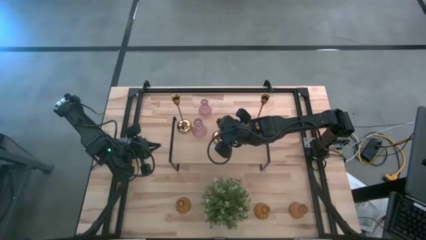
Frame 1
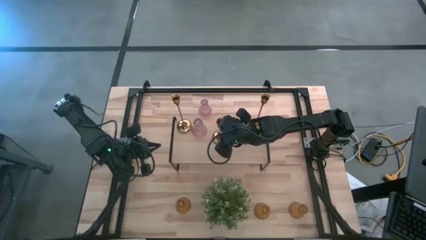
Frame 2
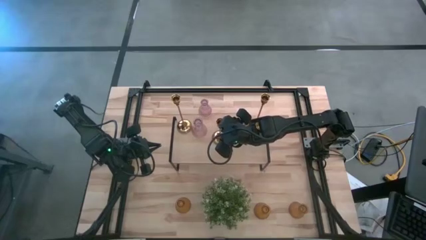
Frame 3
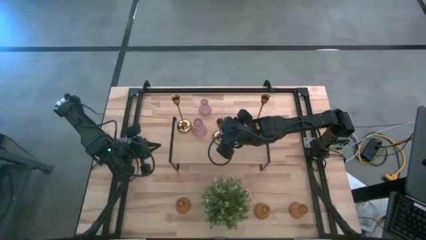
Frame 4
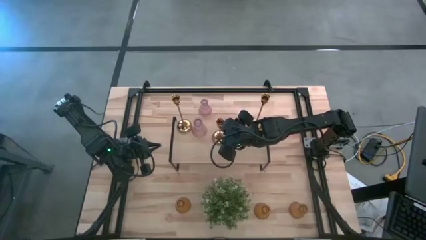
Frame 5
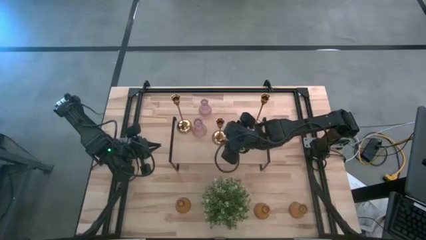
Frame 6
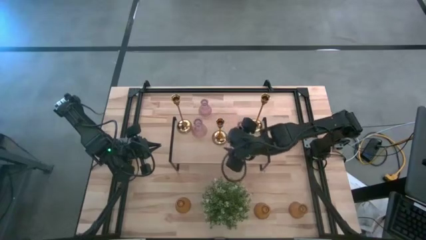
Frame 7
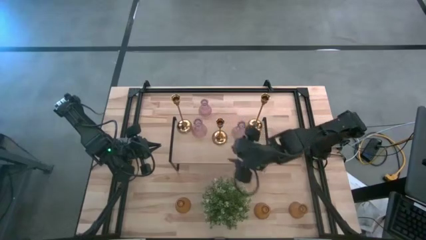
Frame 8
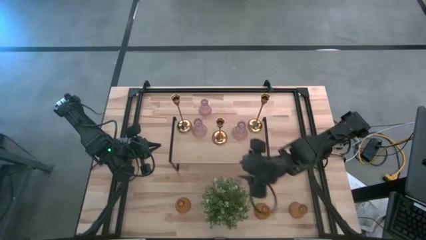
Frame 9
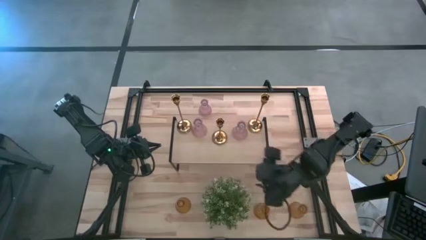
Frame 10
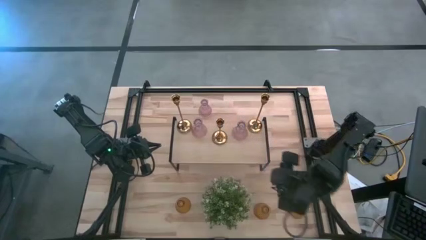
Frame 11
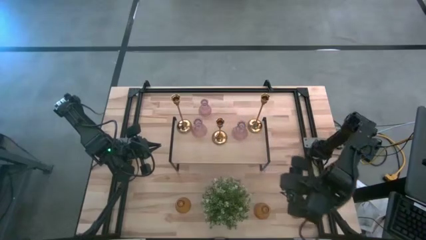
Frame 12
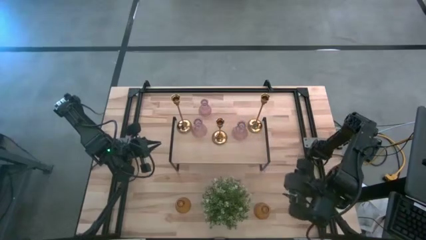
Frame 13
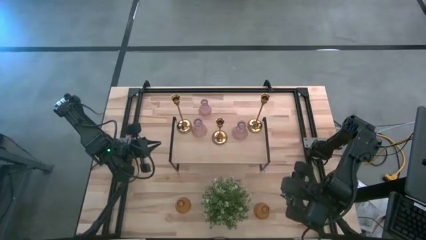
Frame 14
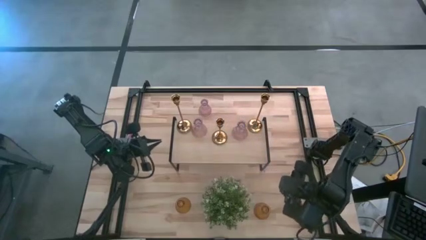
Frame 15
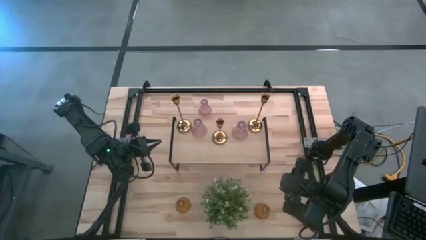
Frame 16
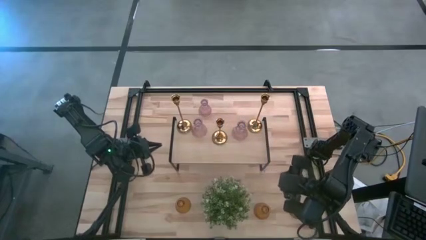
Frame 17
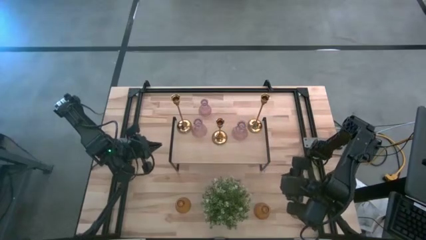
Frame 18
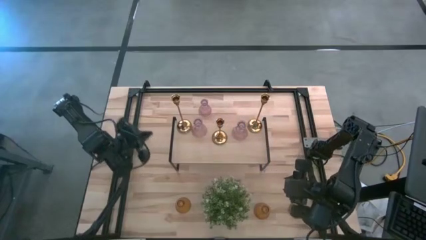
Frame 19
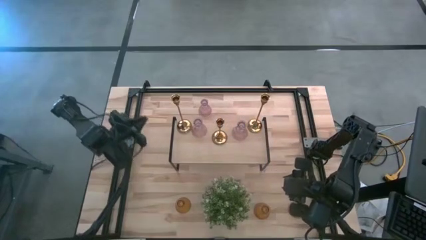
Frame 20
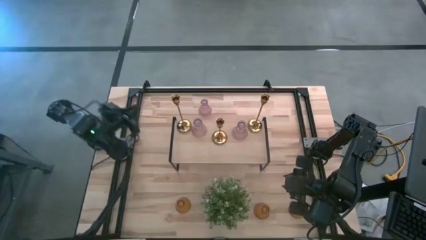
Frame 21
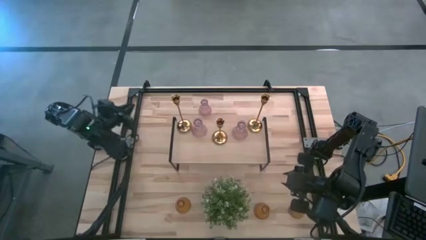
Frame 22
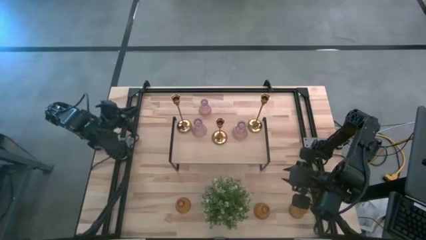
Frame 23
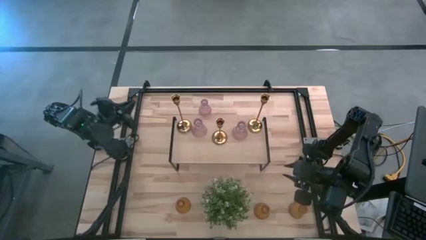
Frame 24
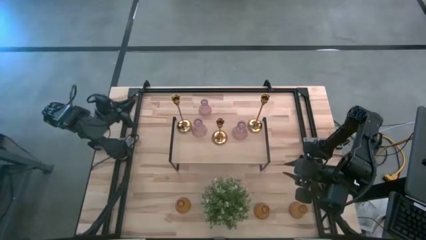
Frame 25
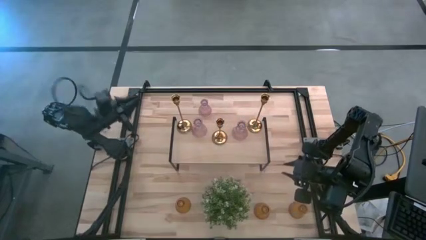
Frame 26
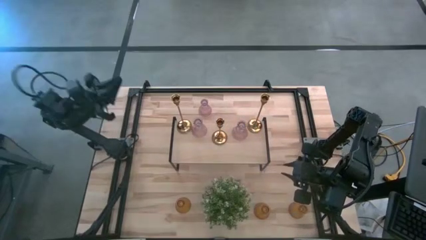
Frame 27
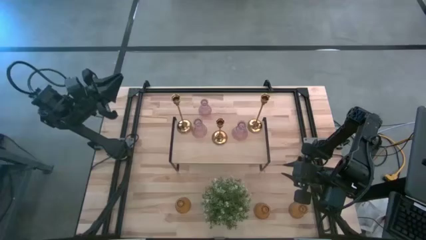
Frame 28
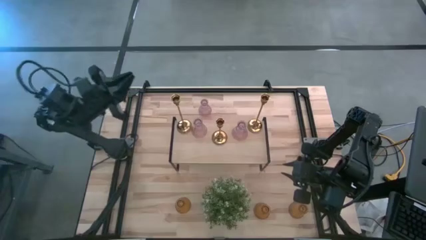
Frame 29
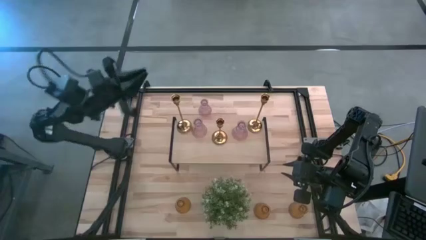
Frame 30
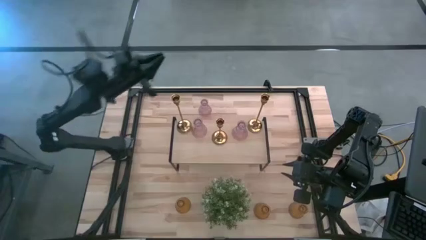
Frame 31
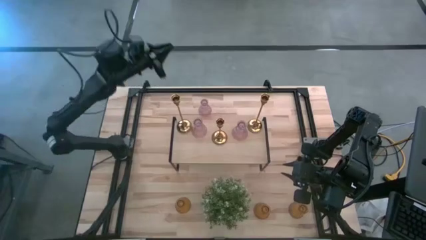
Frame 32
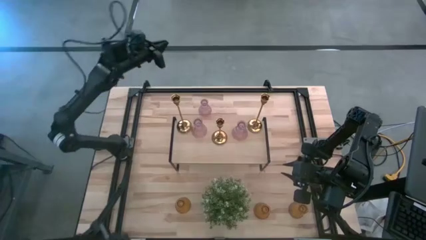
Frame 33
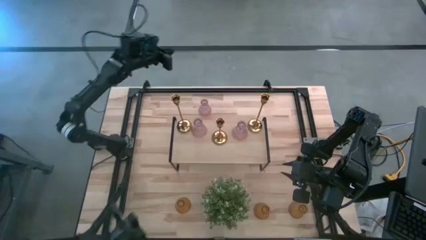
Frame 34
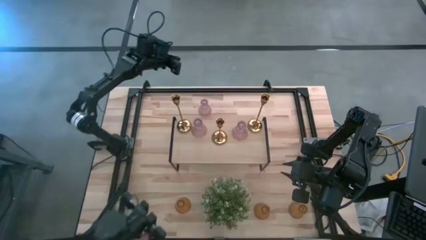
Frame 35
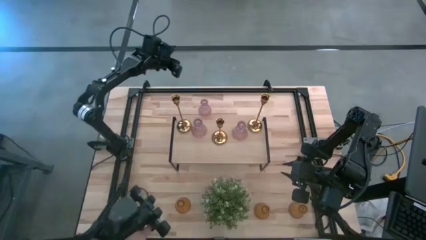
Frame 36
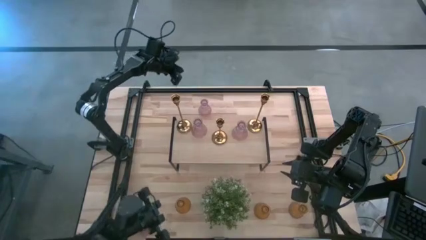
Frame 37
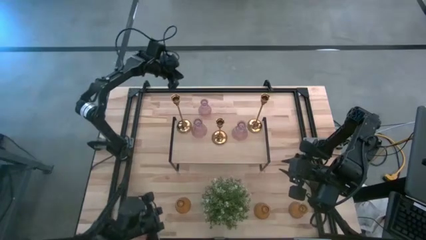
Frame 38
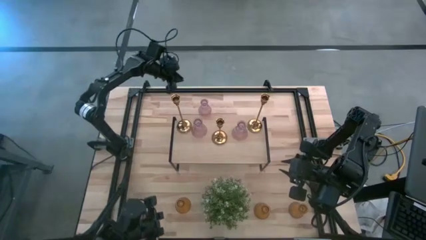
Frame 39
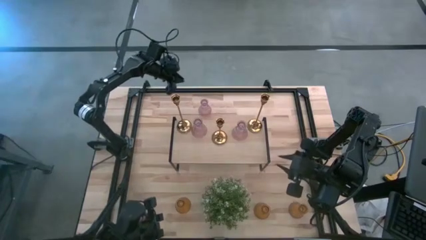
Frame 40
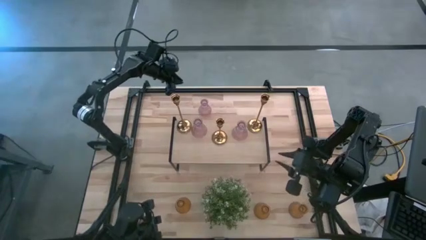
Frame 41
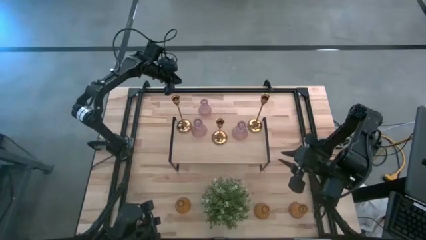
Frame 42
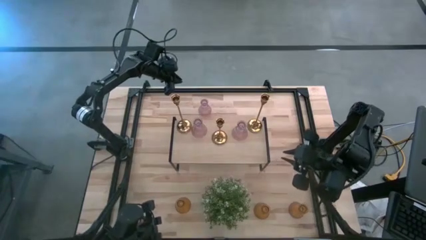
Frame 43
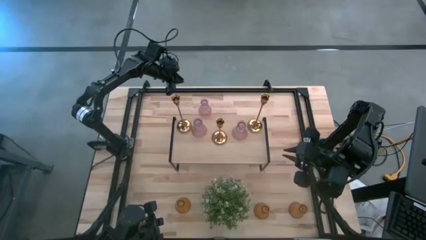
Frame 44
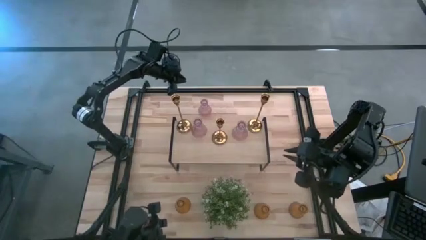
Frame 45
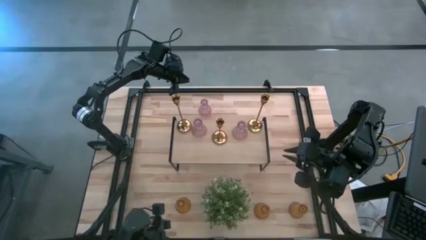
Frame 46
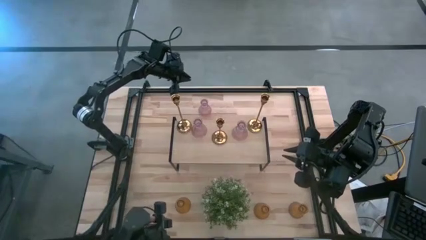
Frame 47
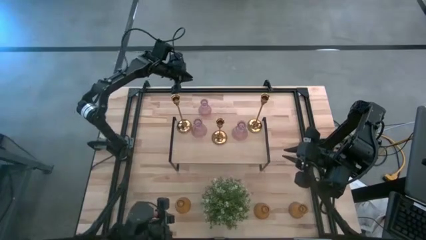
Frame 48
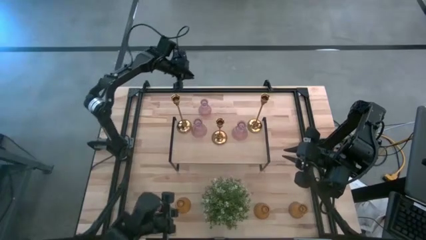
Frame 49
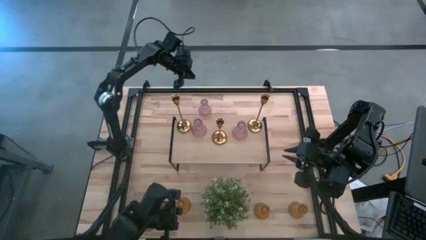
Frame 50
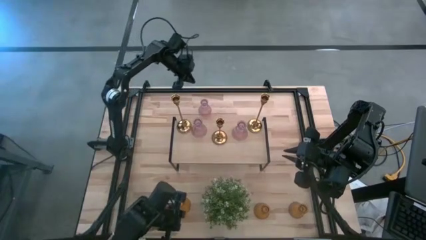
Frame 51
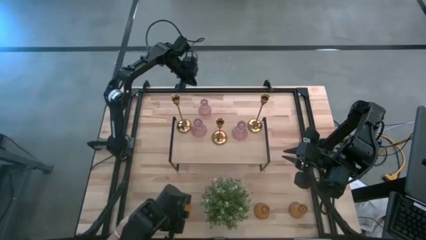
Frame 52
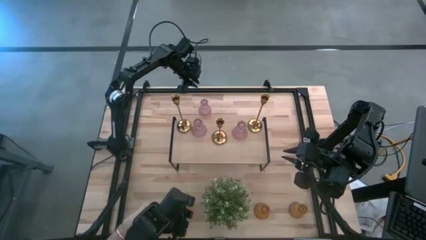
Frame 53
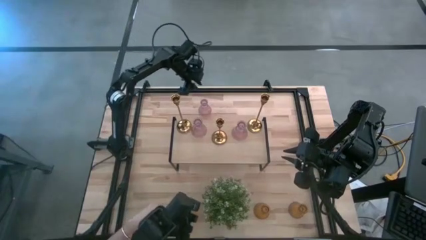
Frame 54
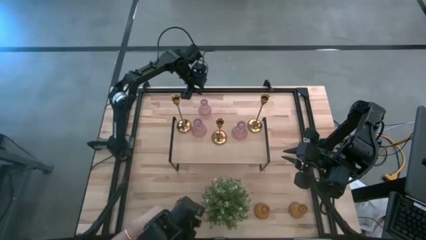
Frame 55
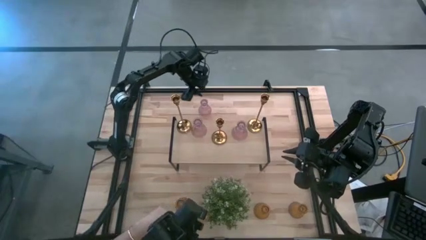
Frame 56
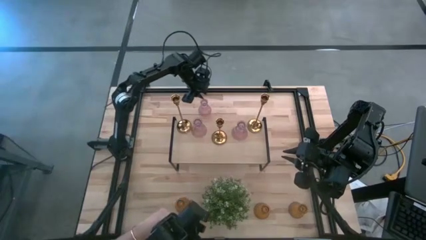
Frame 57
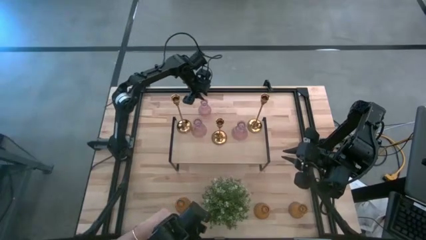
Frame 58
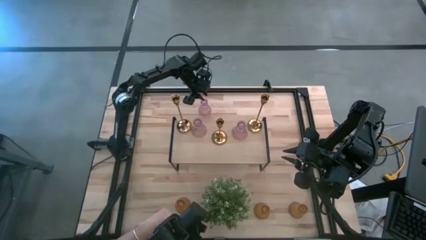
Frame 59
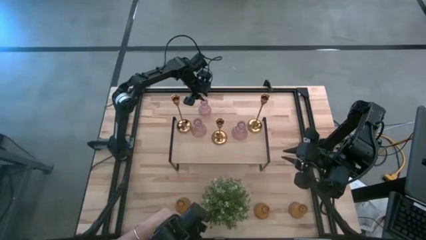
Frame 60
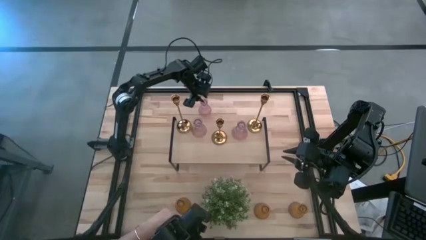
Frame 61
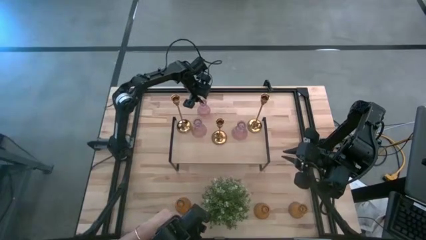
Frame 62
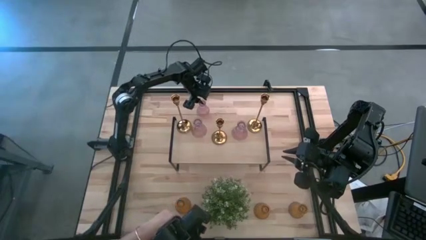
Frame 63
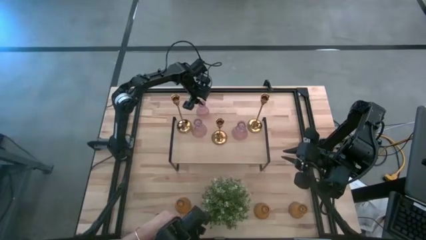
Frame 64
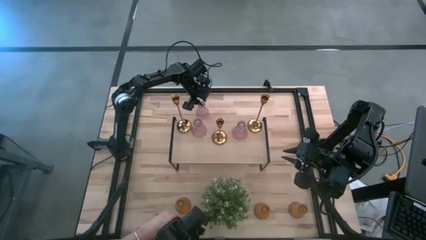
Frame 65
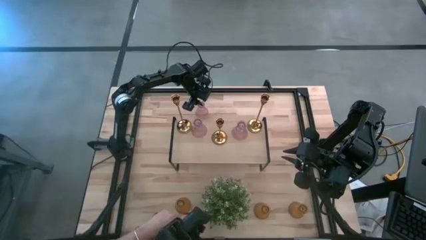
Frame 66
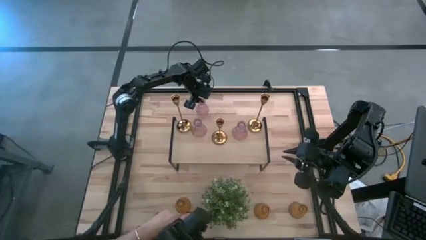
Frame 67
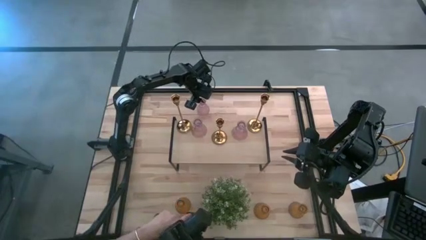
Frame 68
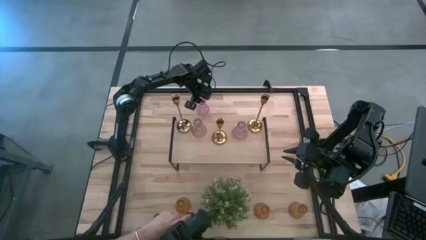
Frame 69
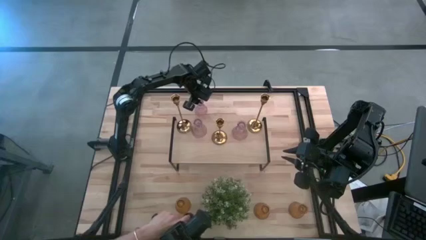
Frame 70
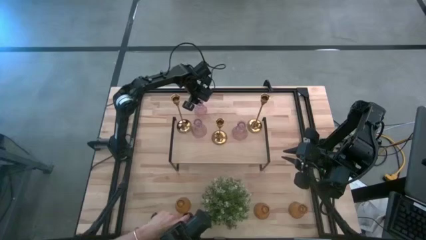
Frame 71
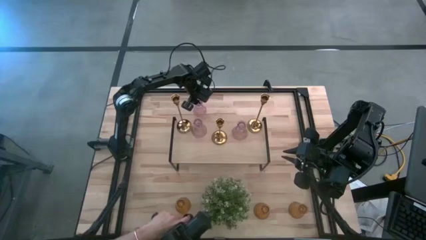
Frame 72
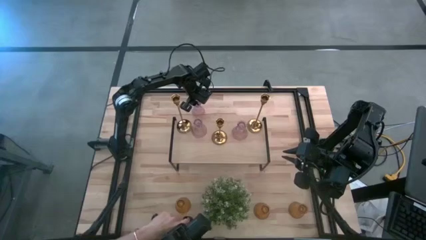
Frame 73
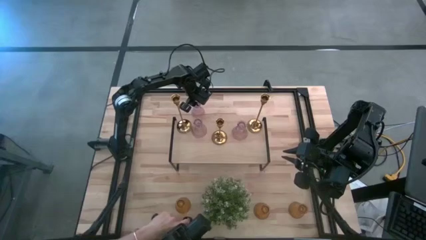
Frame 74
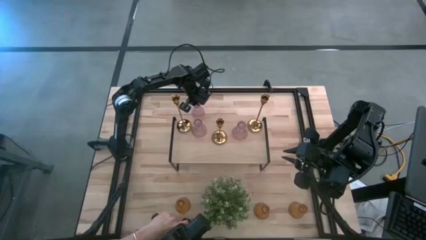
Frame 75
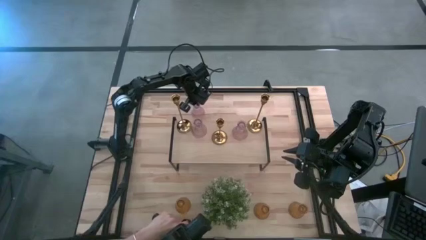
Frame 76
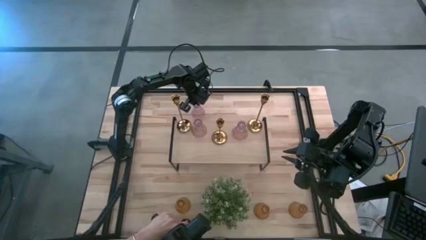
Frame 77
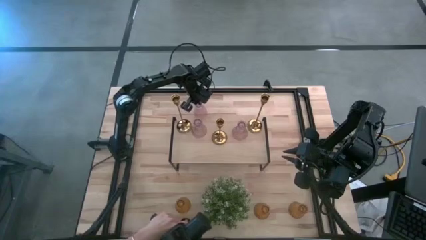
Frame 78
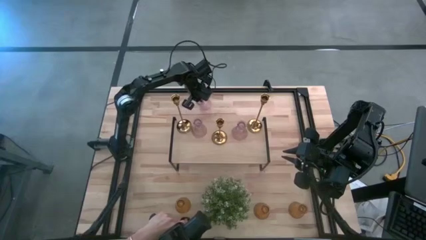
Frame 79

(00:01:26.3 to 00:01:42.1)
Task: Pick & Place candle stick holders
Put the pink vase on the shelf
